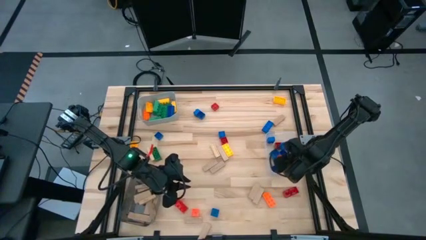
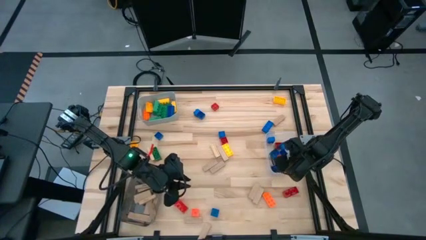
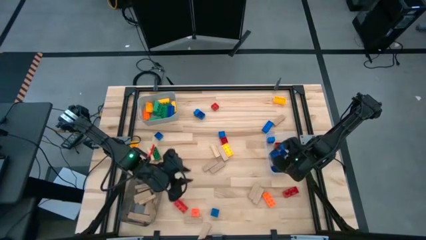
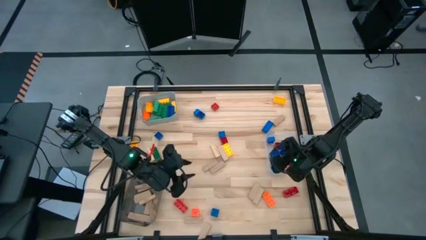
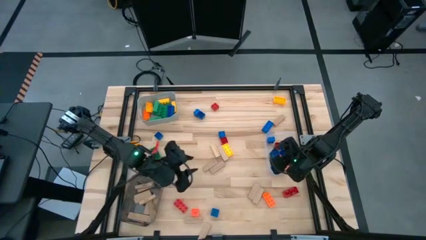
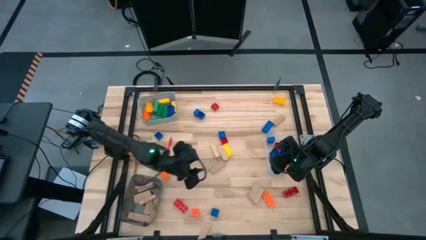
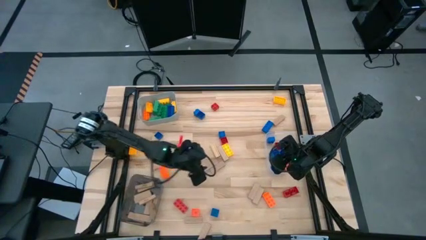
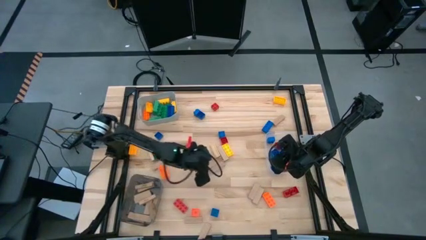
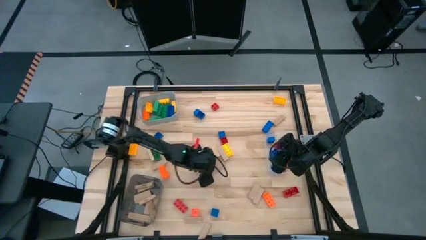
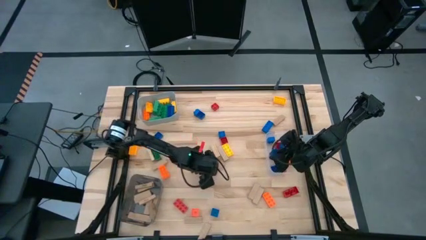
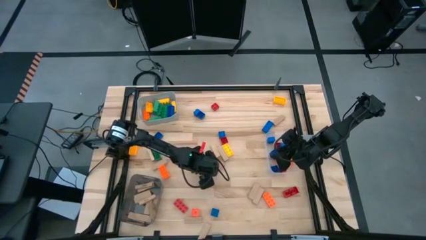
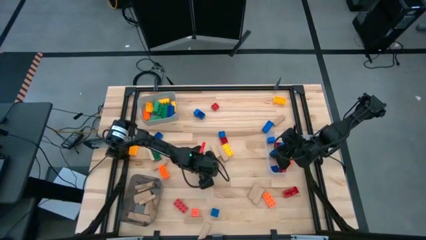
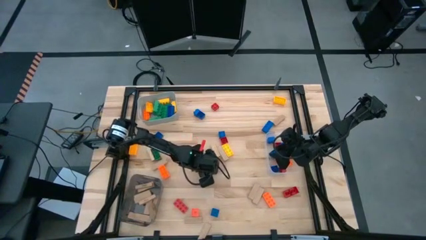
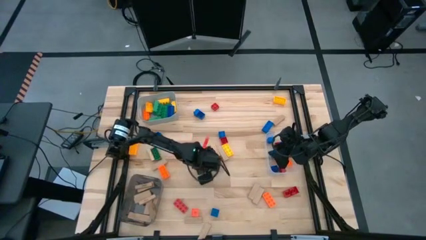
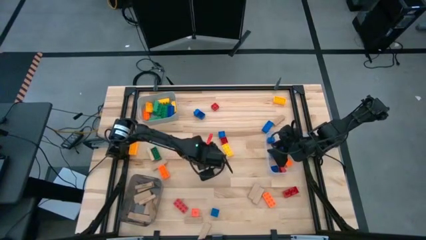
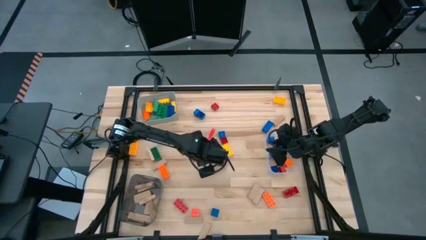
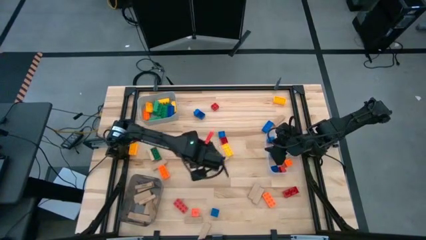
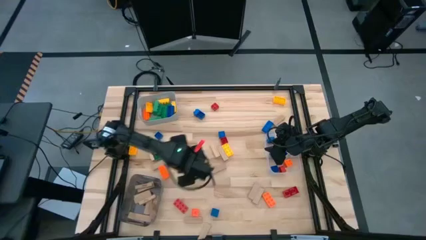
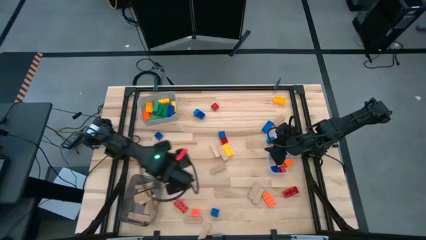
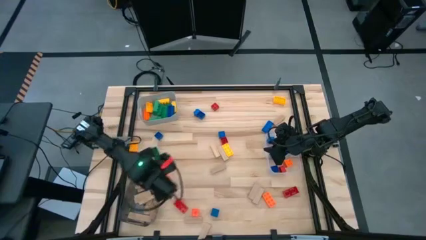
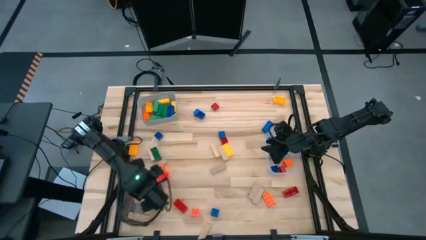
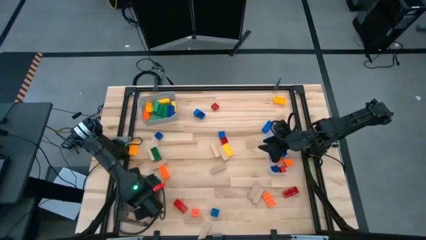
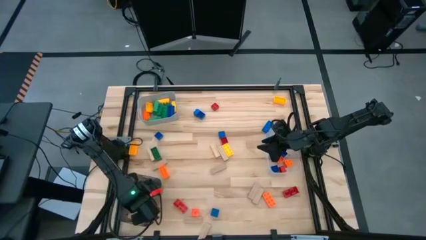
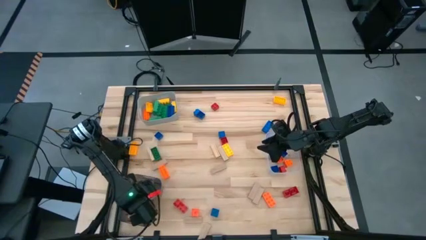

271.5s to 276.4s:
Task: Sort blocks by size
Put the brown block into the black bin

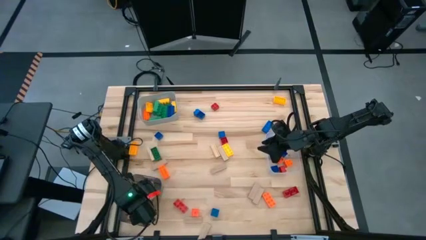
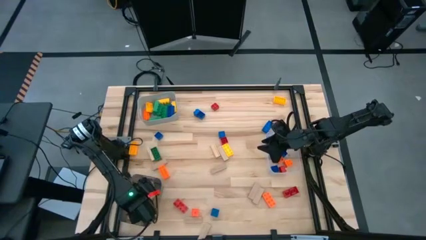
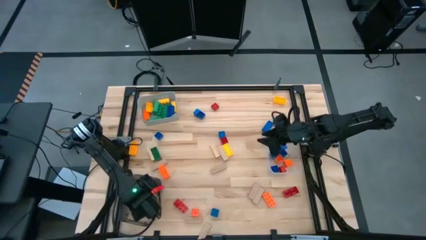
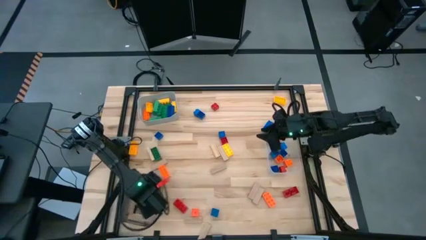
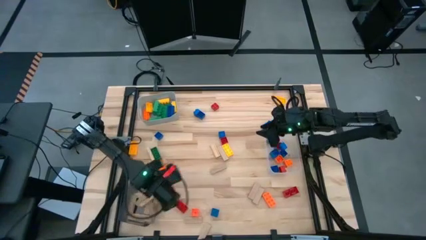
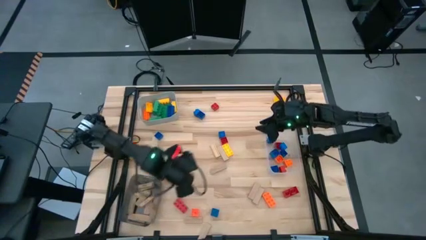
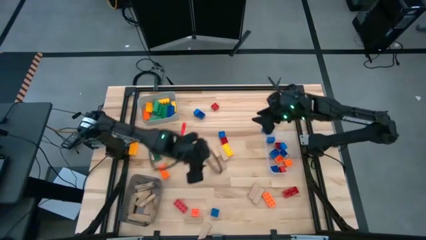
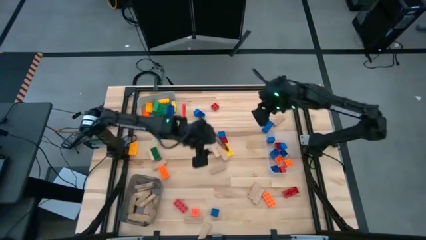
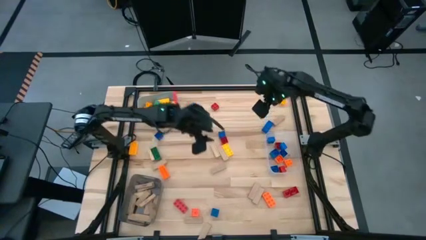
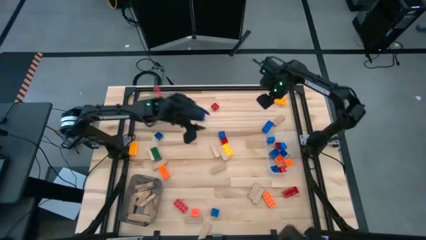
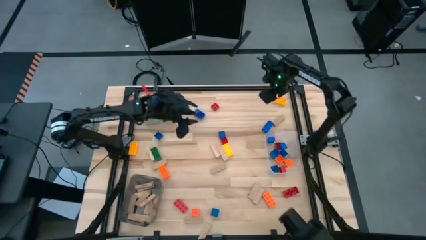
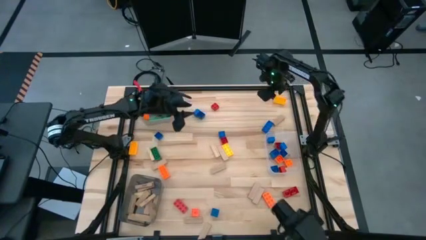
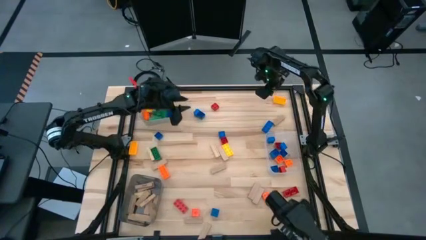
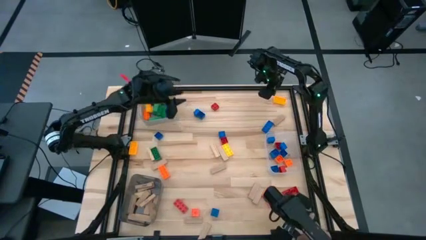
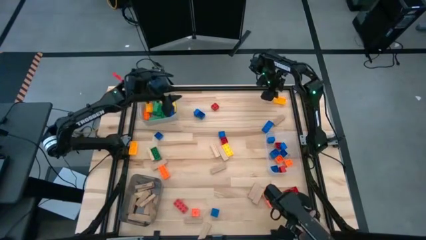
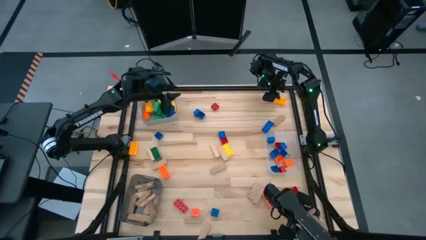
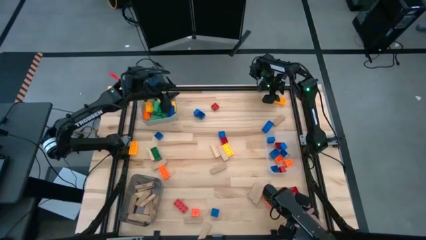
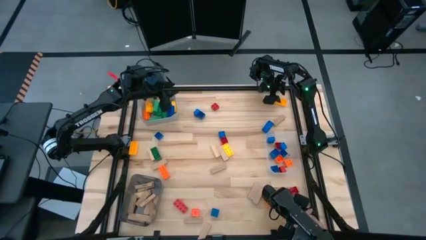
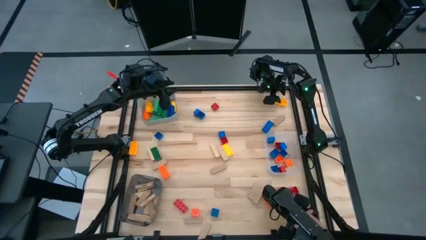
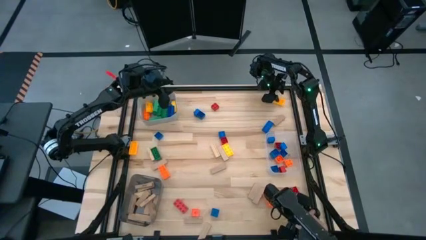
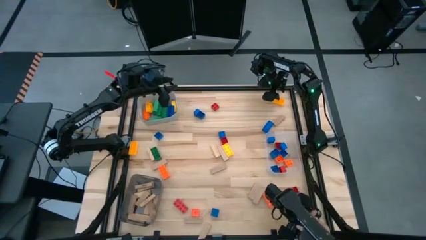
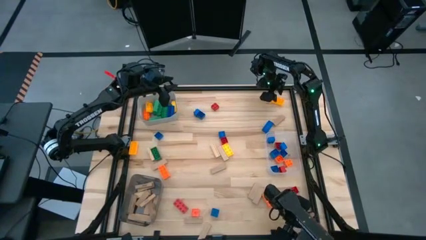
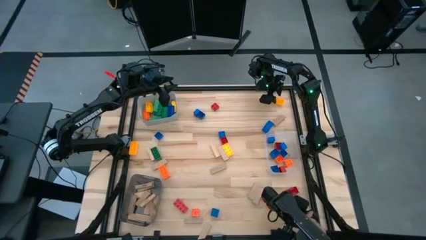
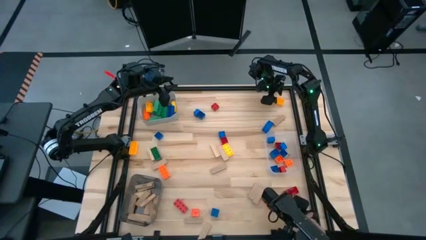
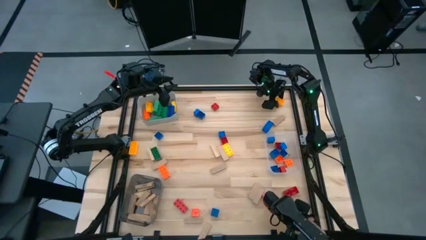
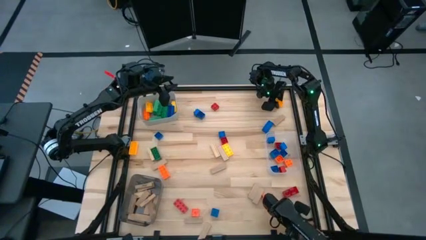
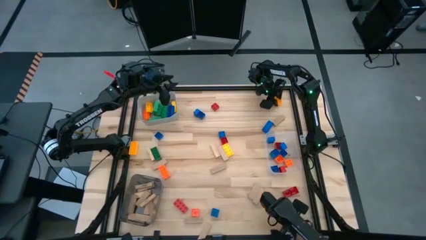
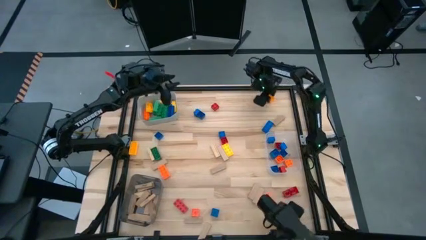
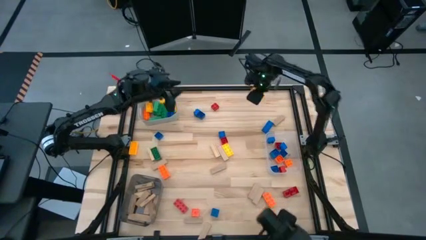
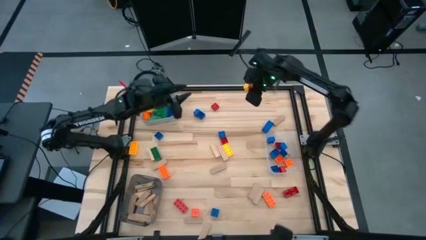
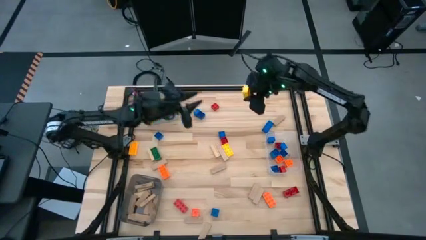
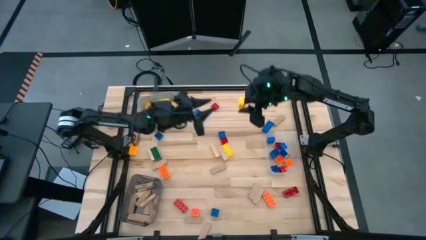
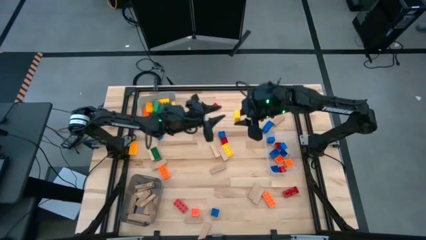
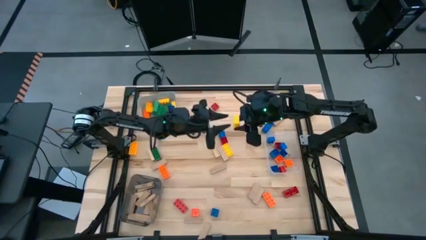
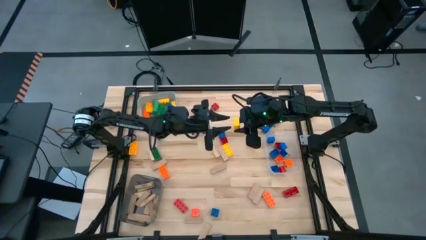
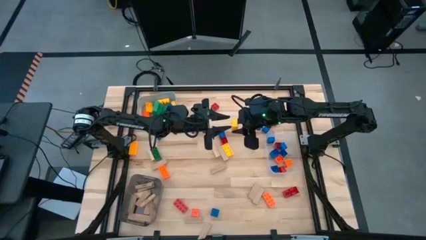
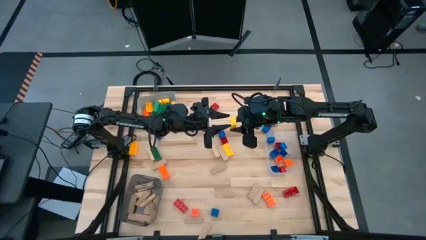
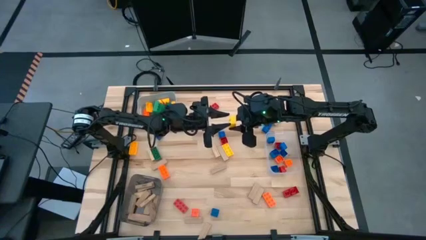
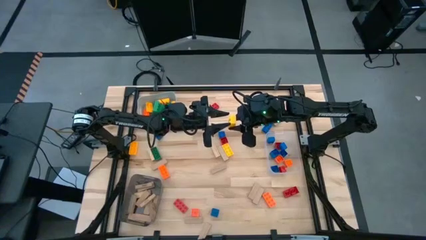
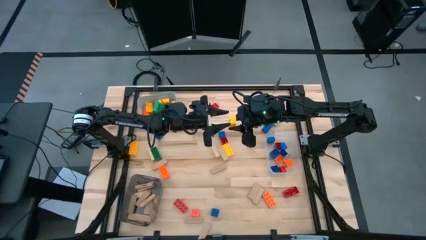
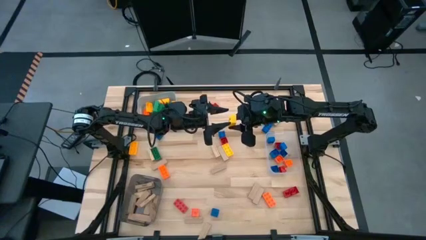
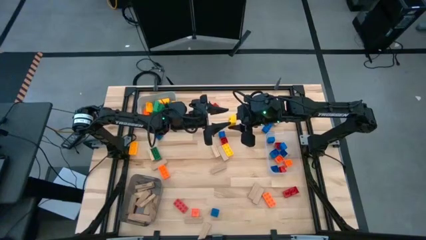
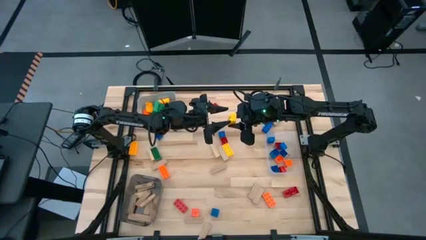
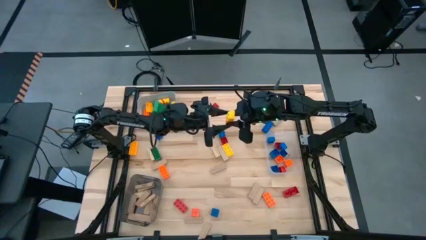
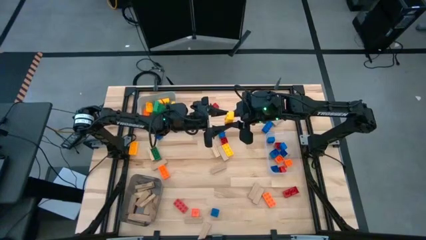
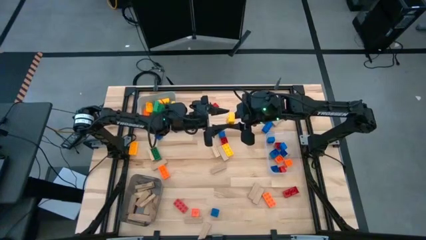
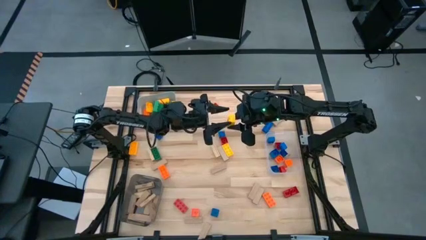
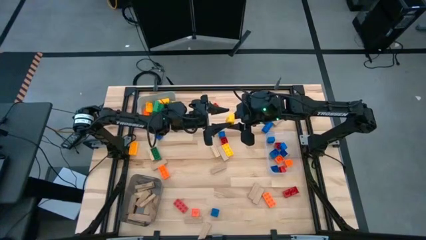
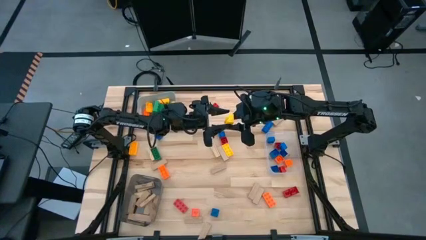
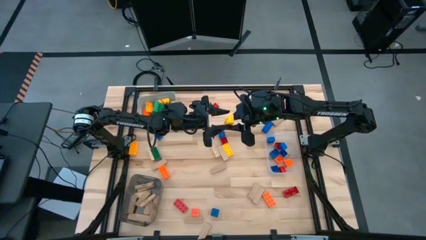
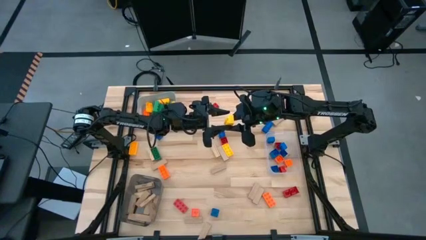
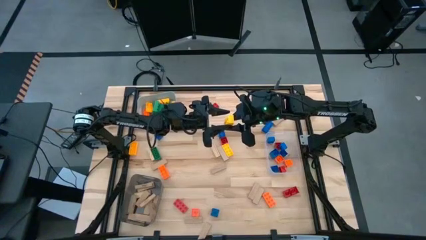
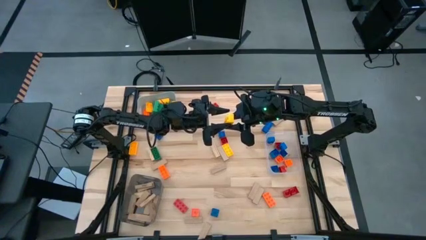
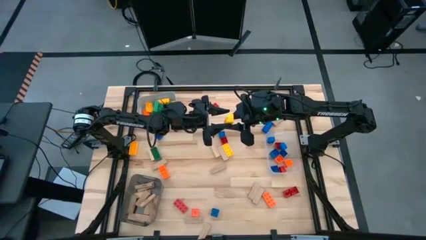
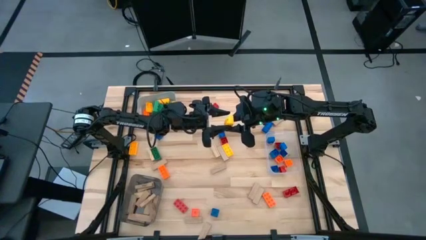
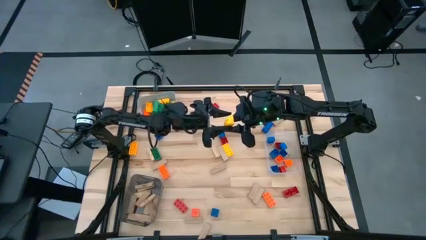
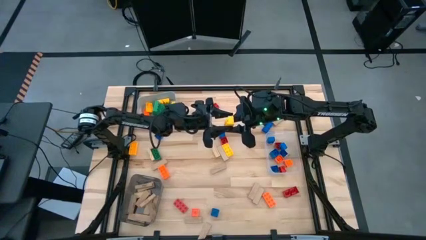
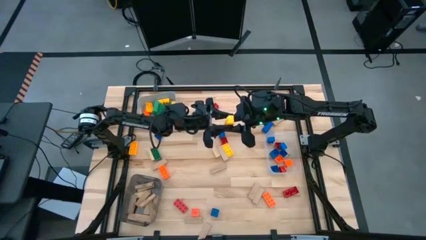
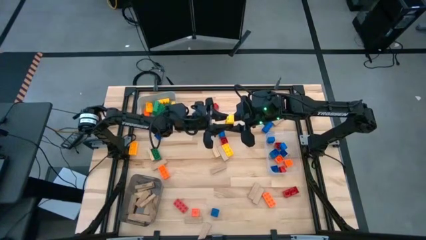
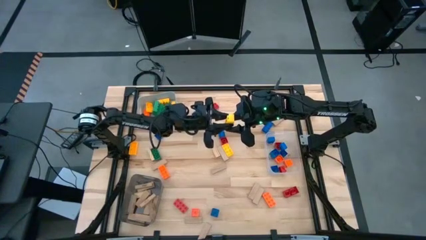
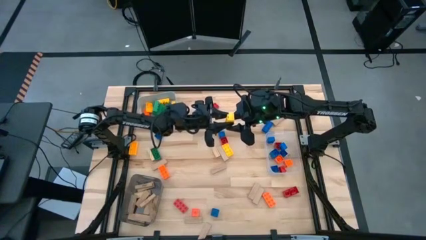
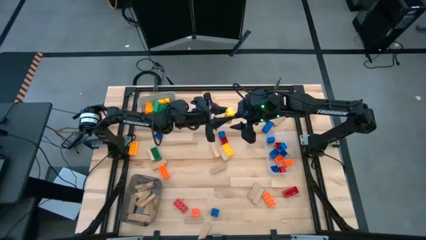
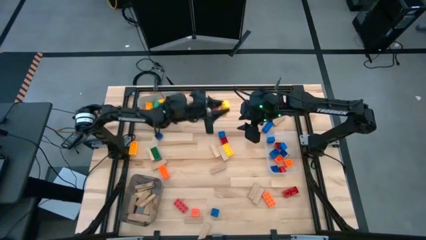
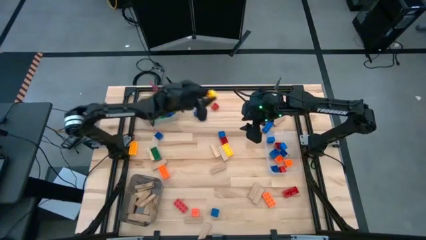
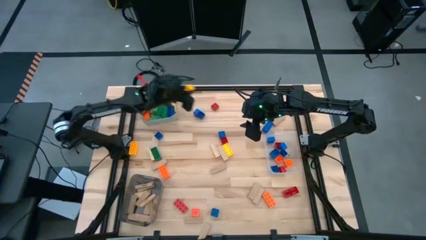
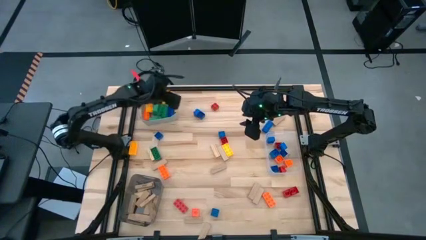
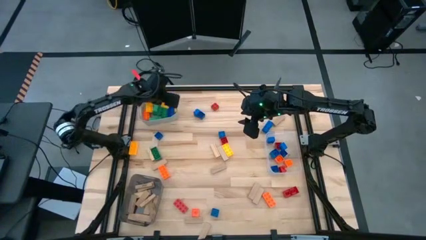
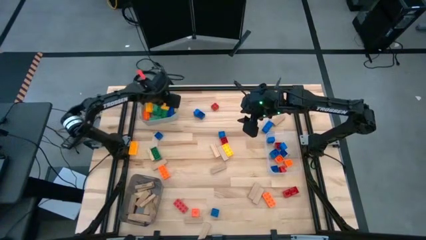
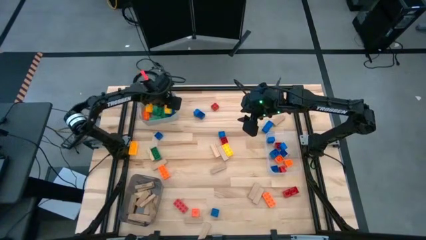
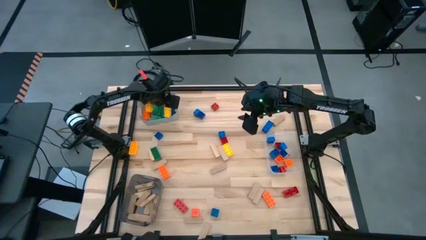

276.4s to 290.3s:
Put the large yellow game piece into the gray bin
